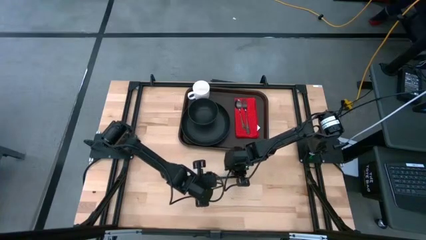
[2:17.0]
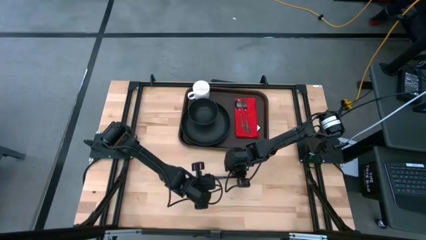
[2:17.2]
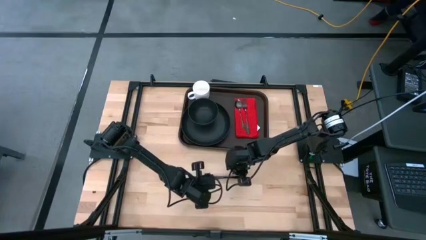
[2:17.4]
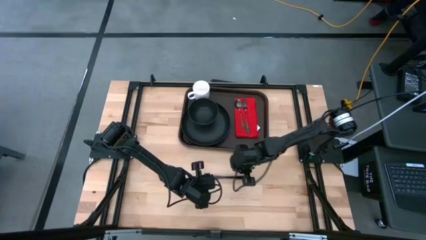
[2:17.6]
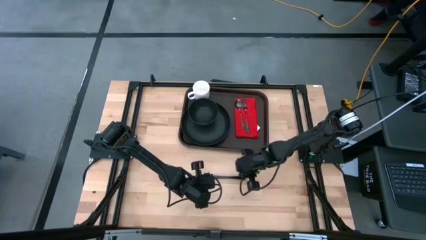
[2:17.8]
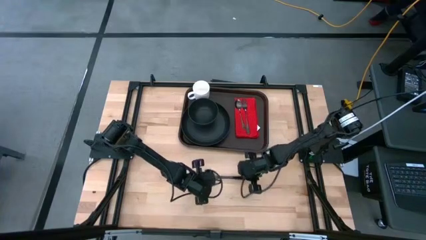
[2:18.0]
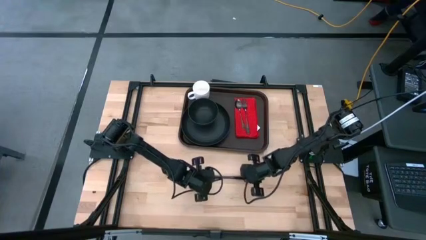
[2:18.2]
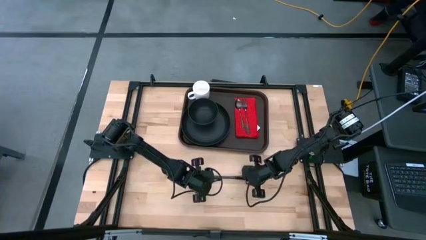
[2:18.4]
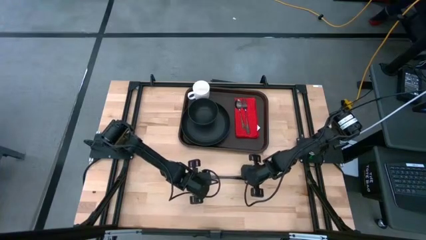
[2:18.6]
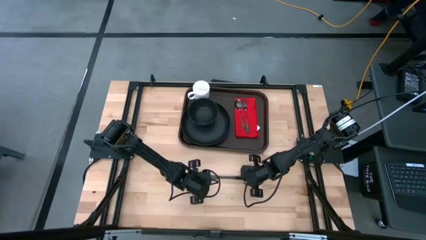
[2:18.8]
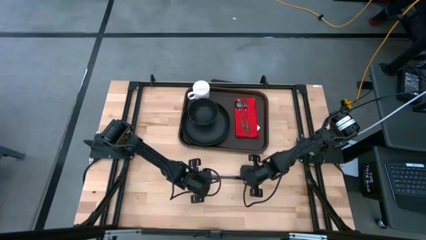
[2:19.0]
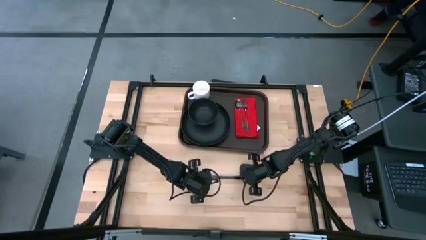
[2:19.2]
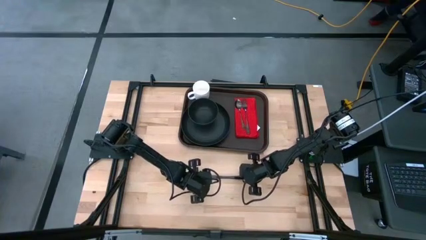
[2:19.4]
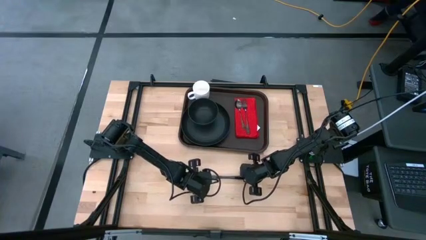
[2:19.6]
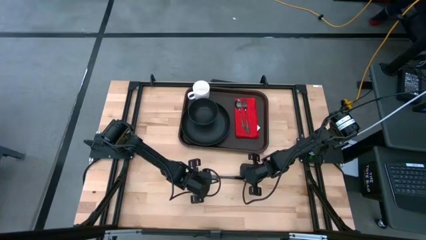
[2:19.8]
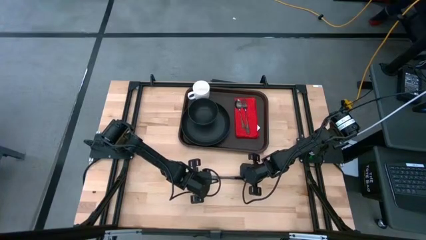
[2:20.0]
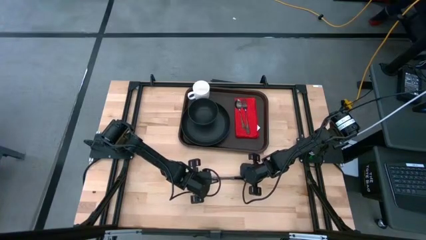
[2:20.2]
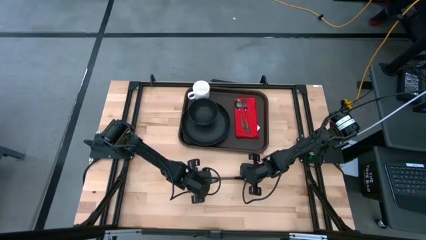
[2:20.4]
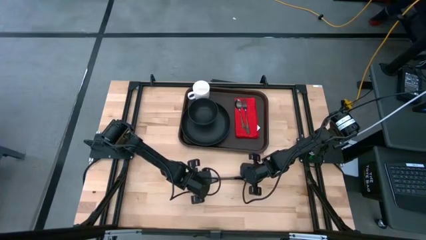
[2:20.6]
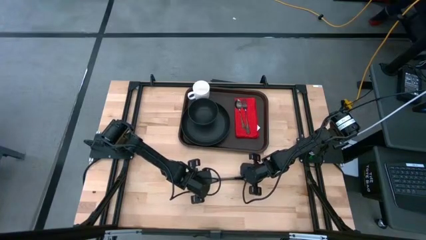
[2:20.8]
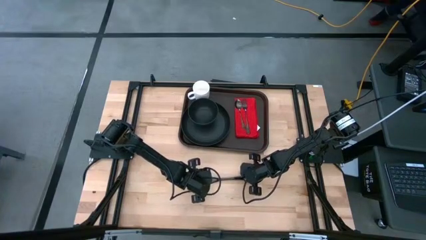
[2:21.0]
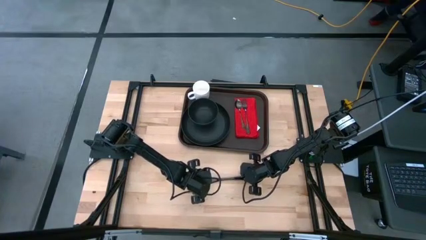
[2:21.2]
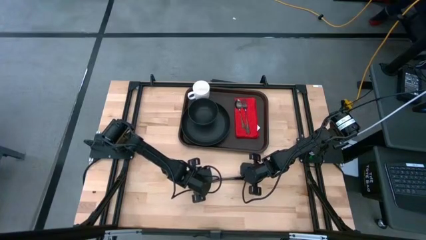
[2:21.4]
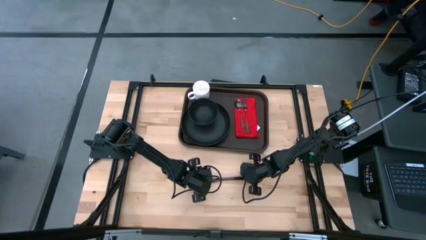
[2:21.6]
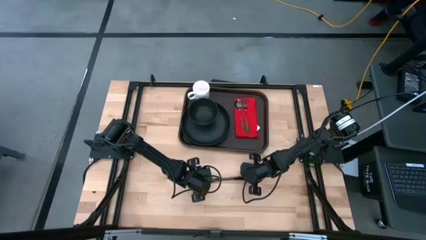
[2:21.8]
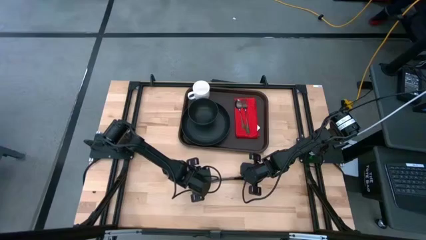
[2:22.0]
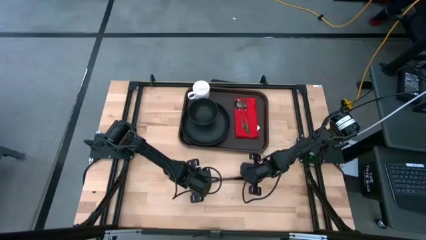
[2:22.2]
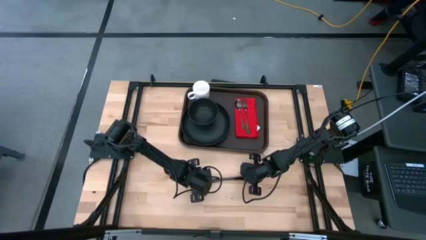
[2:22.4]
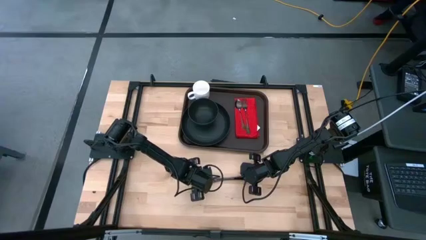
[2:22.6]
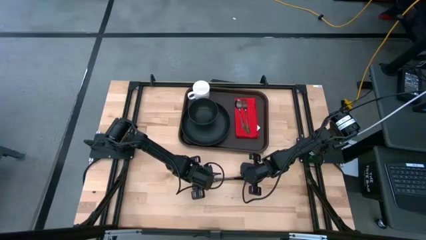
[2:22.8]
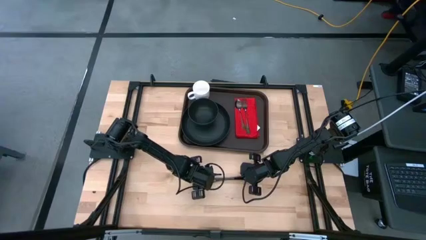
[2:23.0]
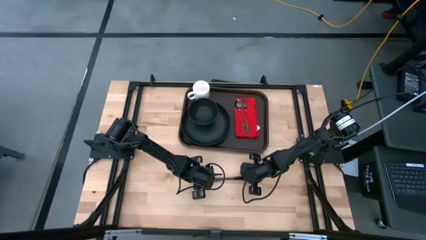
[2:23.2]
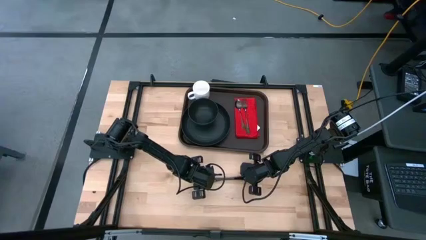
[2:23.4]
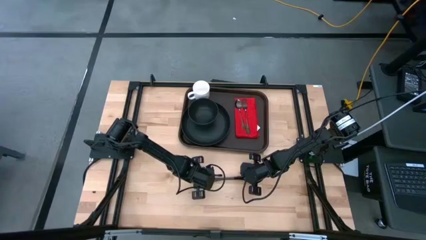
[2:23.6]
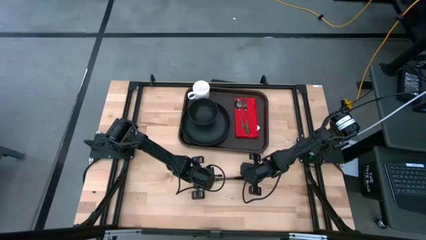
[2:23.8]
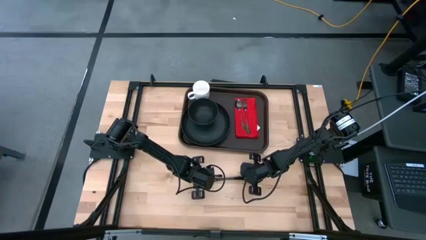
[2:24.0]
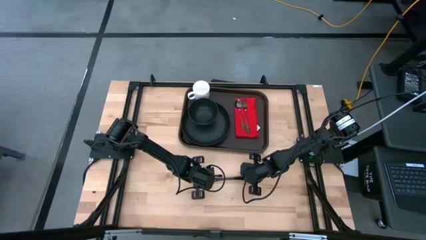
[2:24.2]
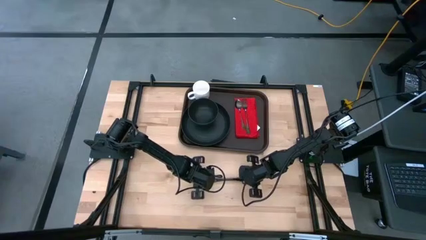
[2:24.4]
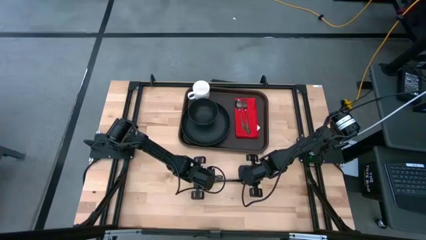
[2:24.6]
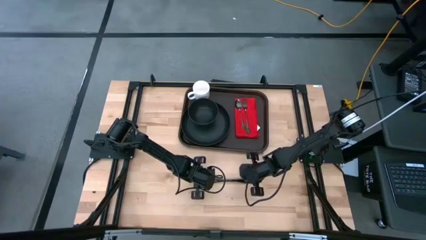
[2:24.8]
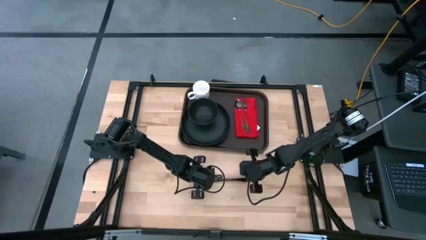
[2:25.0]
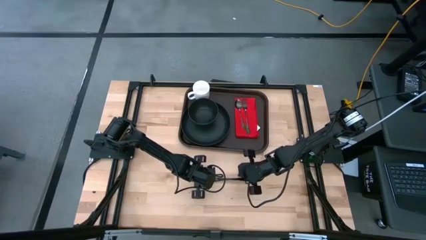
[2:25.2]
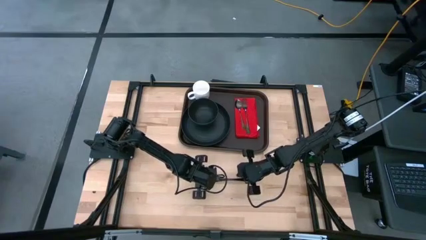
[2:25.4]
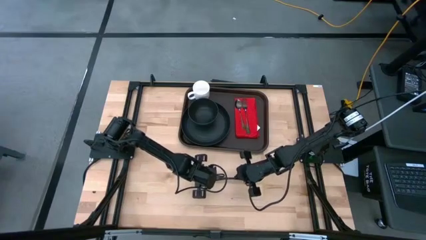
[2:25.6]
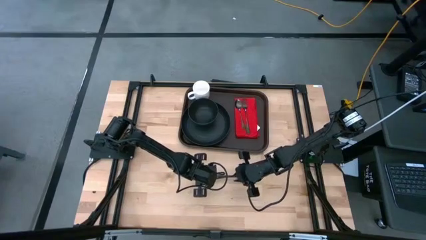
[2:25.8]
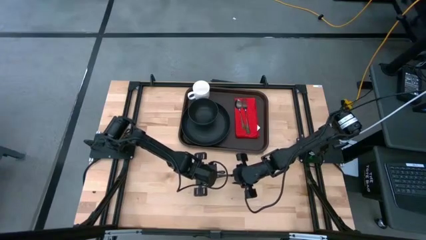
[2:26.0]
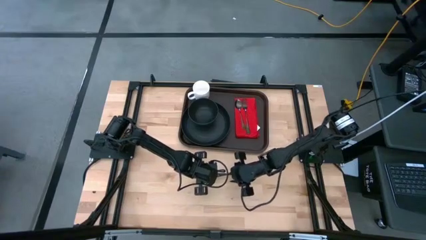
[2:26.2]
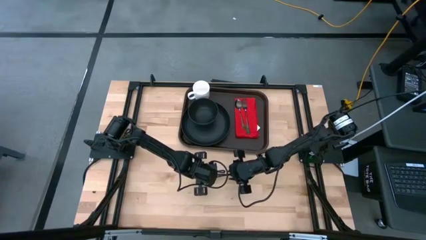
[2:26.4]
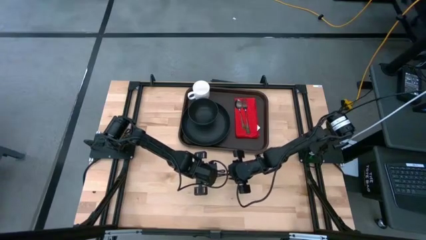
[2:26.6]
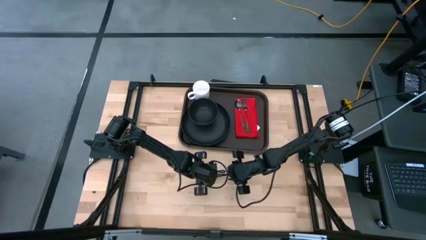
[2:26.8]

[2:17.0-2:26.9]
Task: Set up tray
Put the black knife on the red napkin to the right of the black fork
